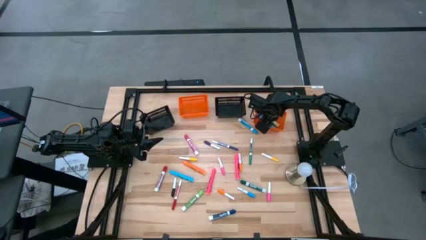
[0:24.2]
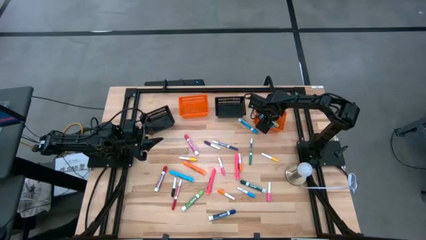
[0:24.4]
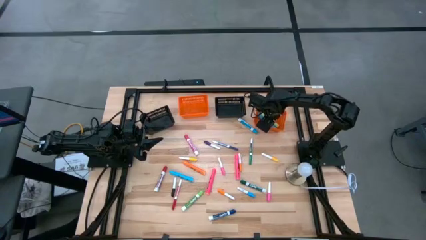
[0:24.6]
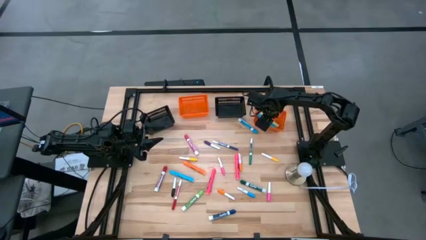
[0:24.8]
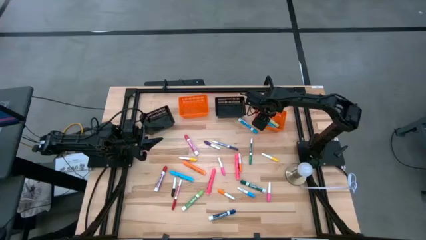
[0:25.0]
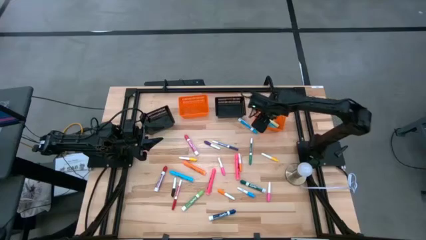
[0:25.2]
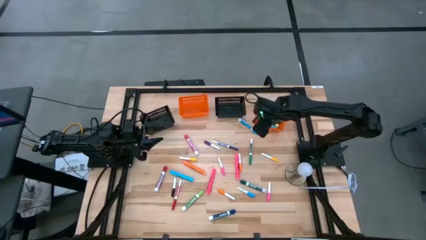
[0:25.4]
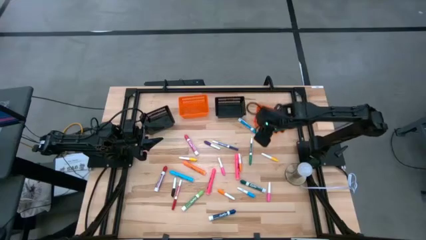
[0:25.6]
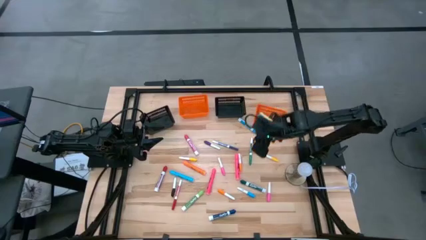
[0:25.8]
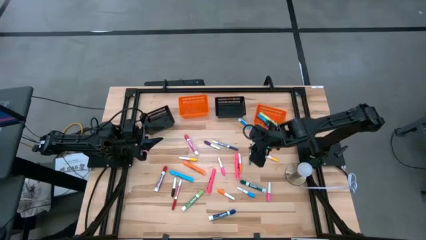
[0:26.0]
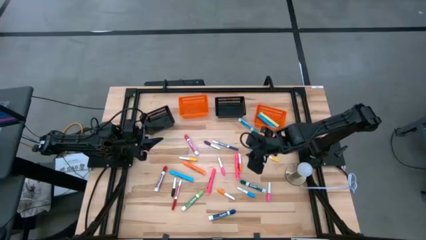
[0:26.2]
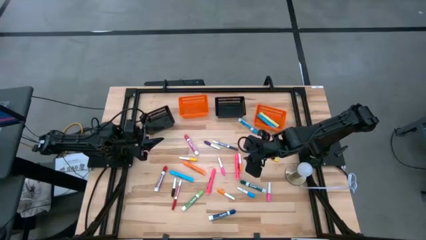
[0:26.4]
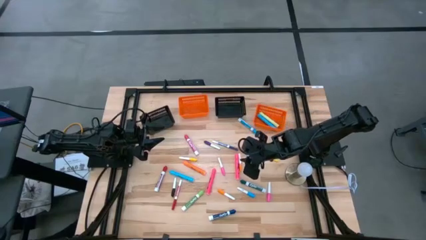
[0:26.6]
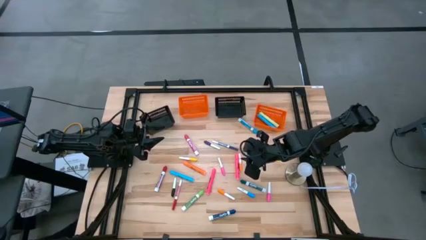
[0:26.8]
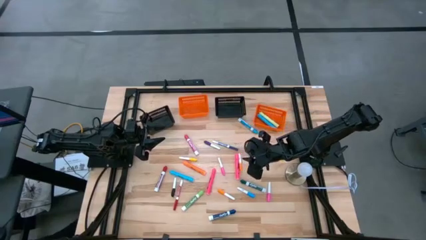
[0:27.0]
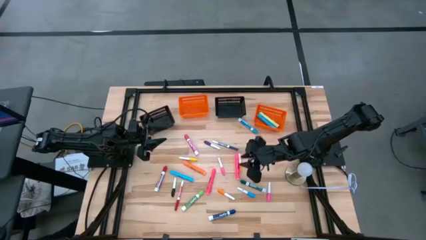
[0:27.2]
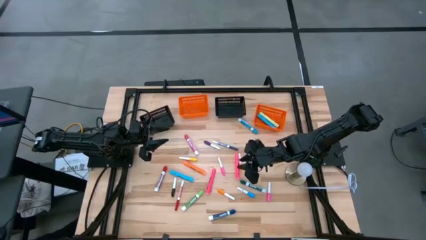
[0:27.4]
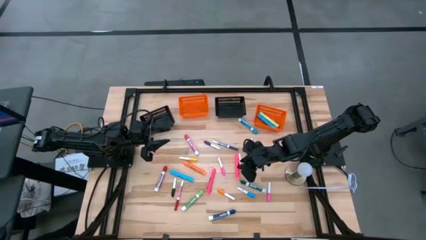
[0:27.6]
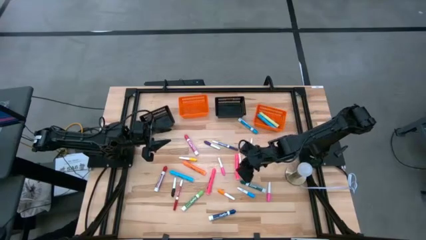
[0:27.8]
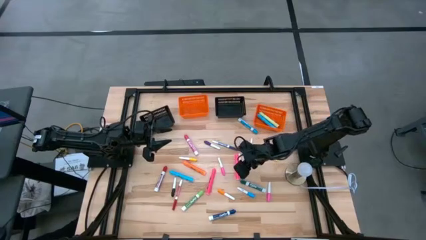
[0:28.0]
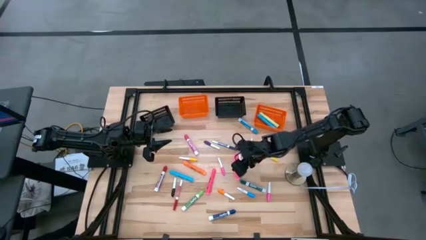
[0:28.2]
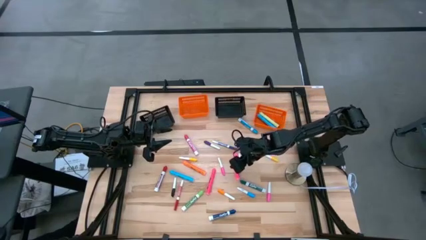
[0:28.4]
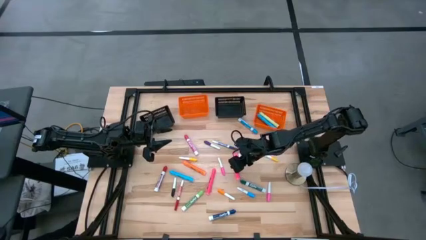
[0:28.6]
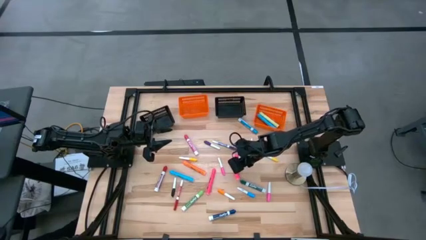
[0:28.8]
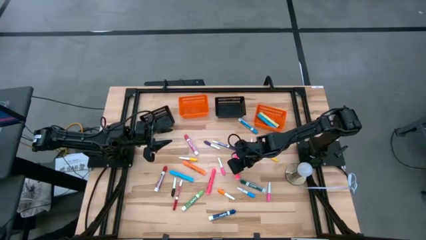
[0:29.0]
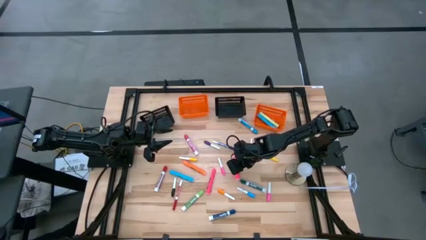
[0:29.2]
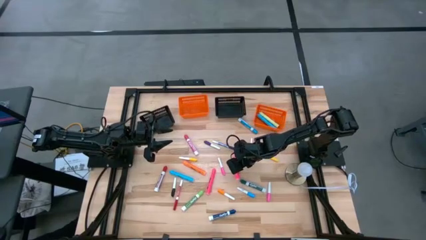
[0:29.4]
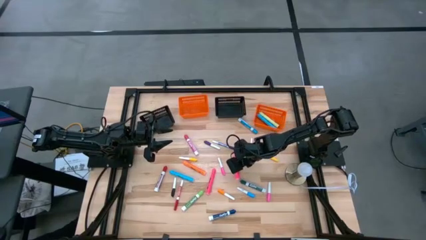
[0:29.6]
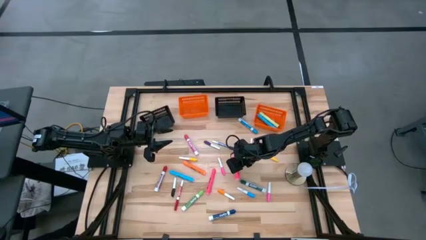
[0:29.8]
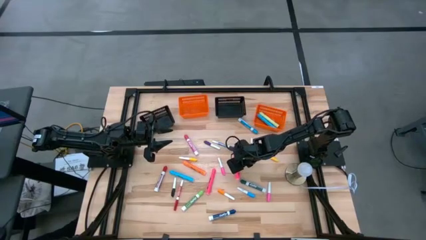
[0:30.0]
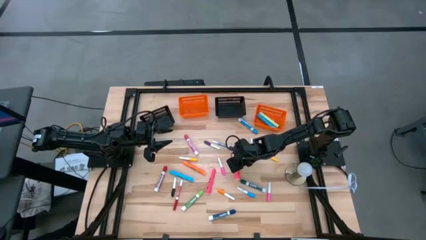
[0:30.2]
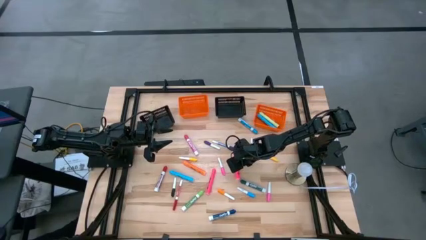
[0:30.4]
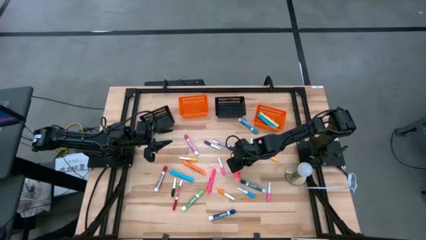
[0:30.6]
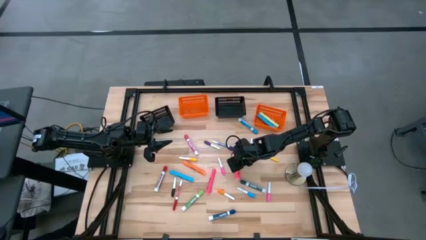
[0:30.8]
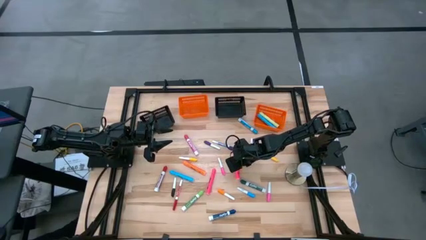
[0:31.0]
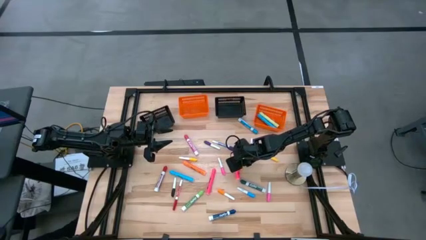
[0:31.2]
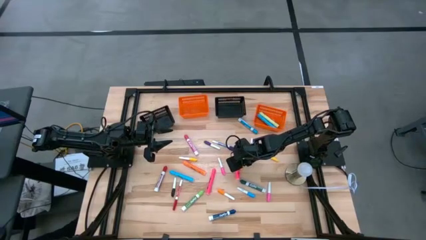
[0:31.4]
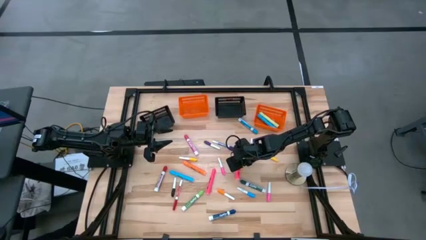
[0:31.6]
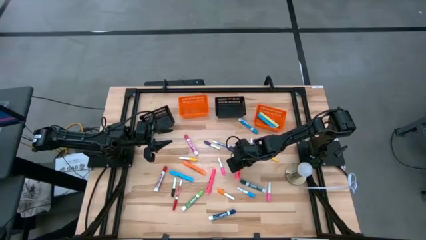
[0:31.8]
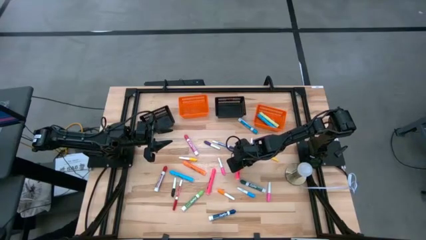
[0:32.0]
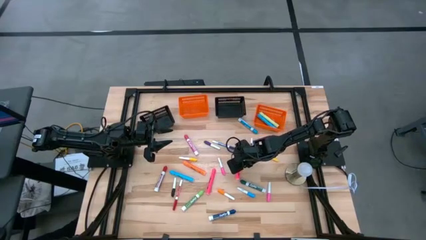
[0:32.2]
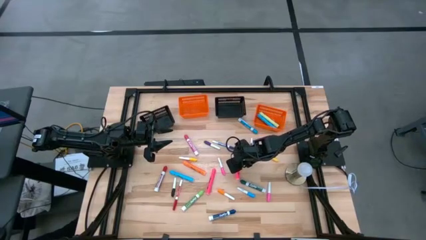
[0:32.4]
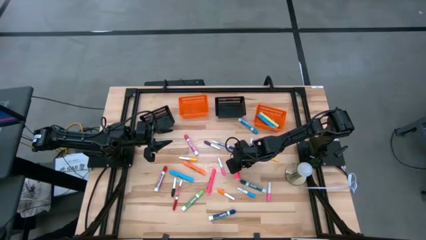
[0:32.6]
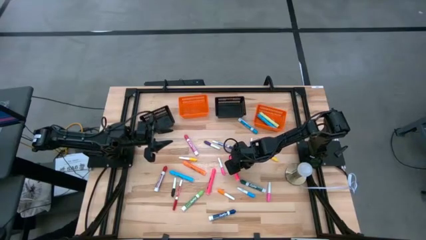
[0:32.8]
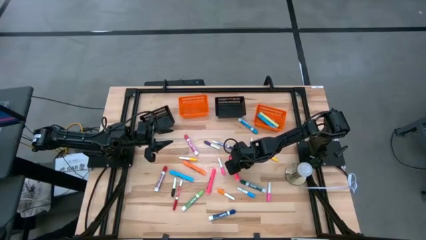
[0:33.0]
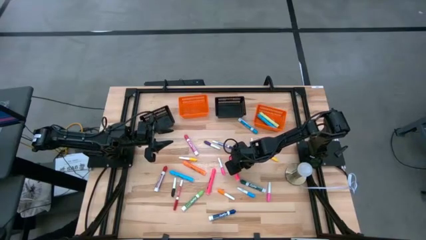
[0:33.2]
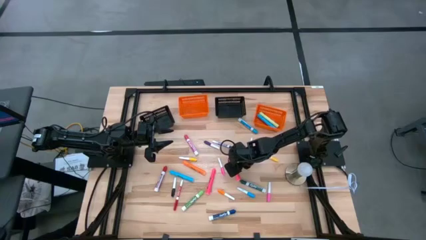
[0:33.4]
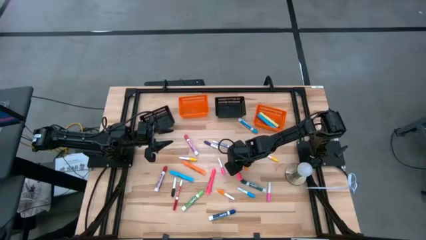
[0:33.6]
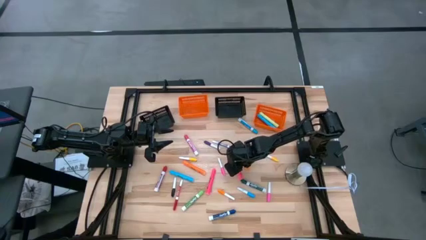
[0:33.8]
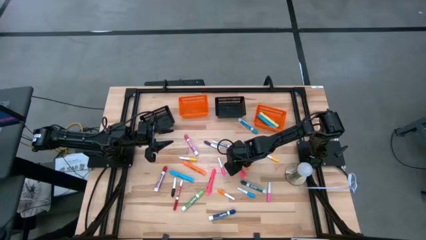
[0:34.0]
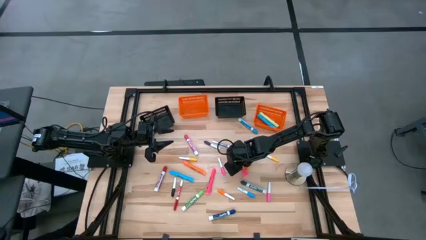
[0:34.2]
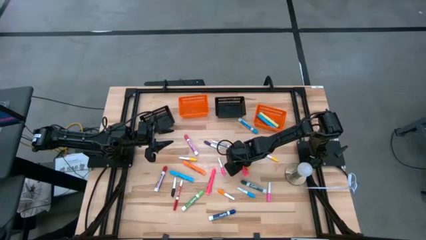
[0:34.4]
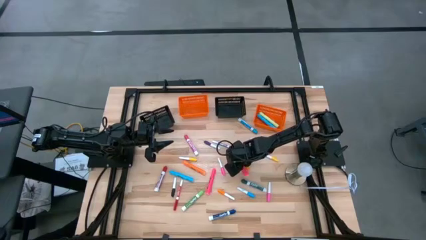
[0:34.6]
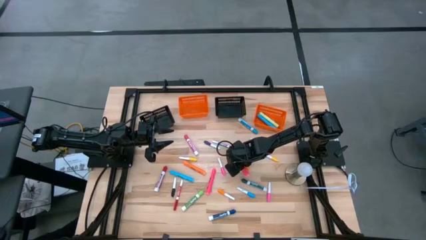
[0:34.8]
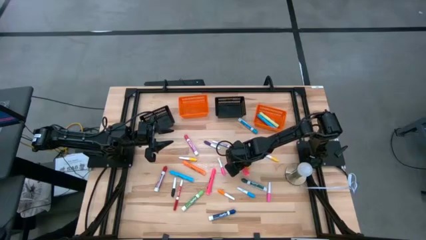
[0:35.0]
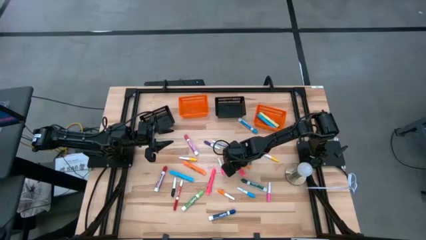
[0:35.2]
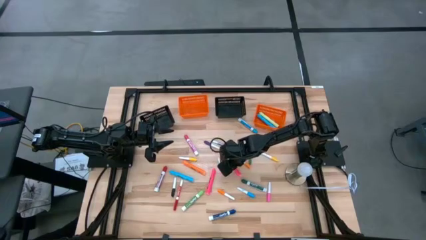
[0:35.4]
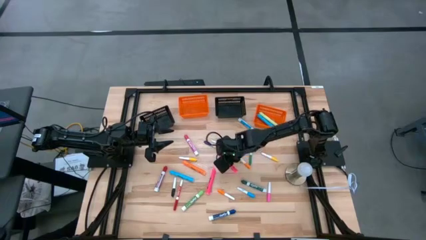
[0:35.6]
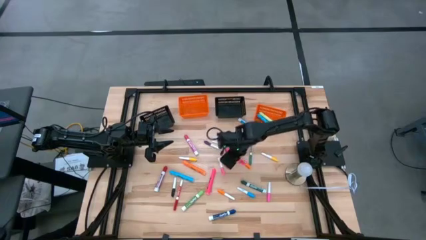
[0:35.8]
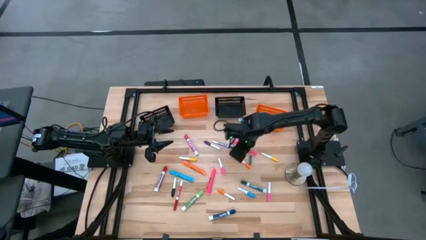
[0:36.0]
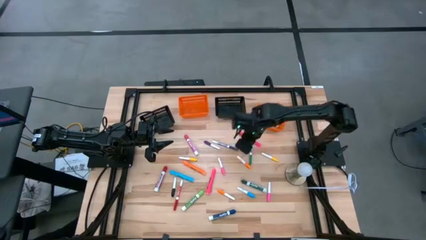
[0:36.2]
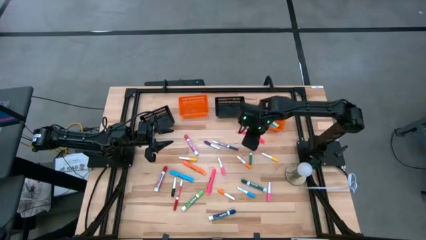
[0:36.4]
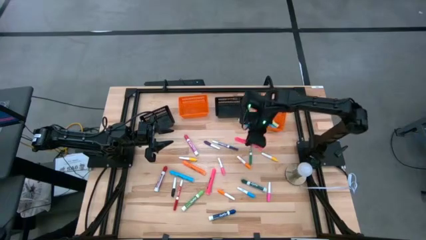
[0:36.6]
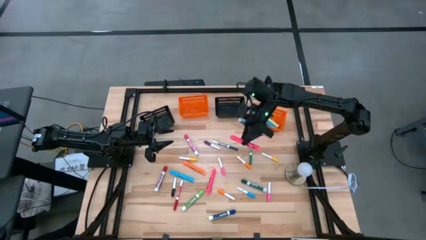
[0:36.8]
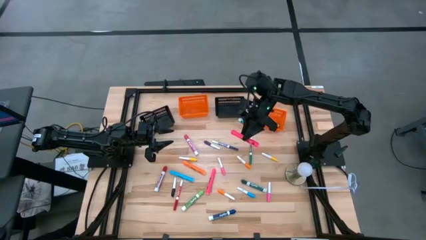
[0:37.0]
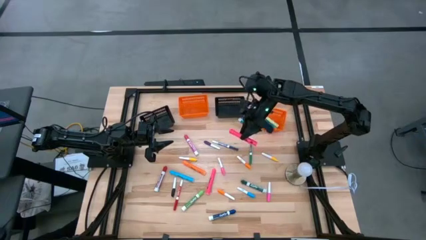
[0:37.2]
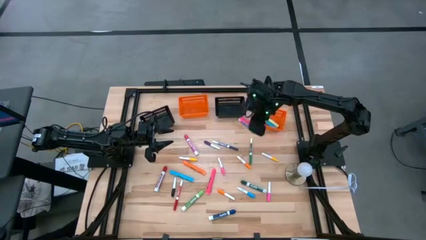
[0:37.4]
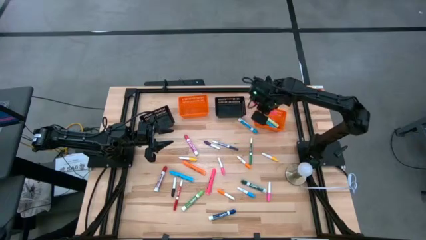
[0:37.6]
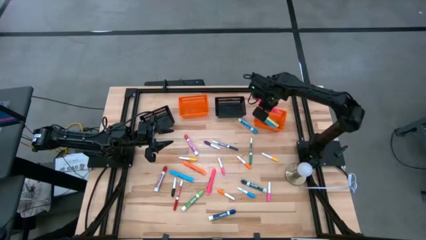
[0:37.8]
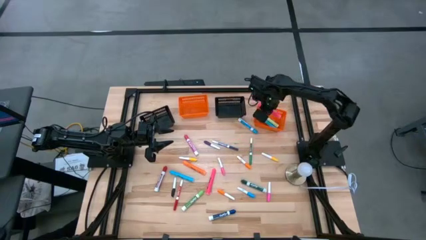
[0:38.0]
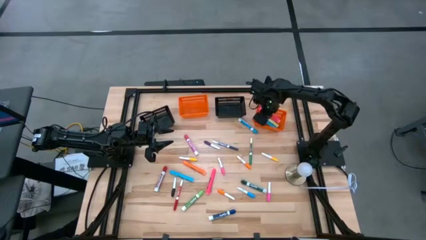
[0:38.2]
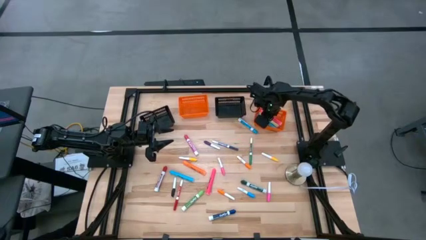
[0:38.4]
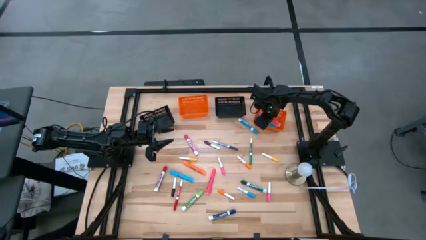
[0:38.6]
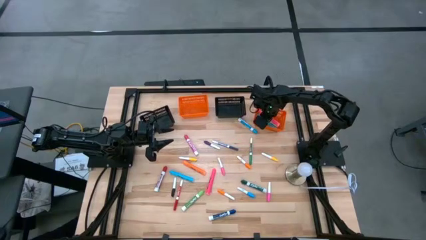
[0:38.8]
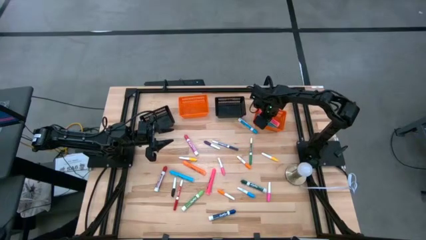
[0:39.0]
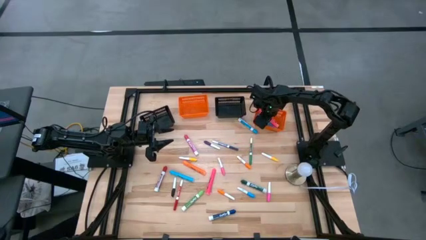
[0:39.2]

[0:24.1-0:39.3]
Task: Pick & Place Markers
Put the right pink marker into the right orange bin
